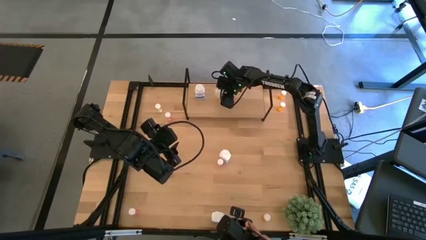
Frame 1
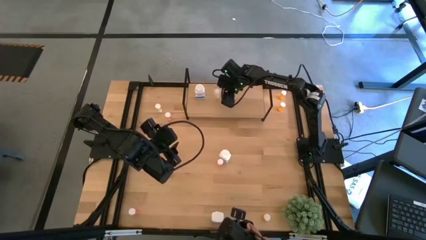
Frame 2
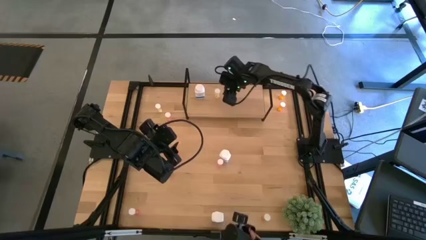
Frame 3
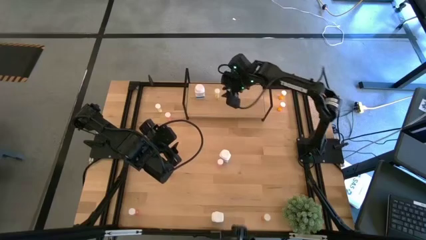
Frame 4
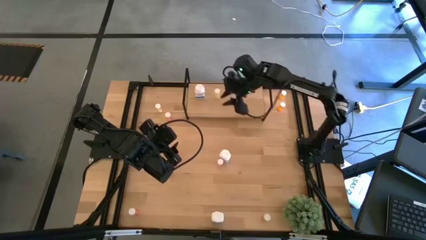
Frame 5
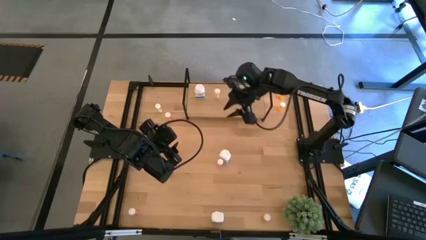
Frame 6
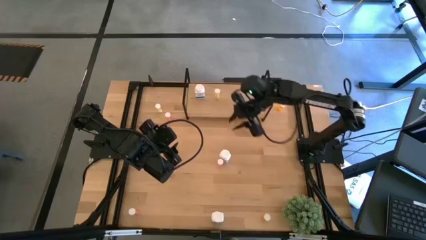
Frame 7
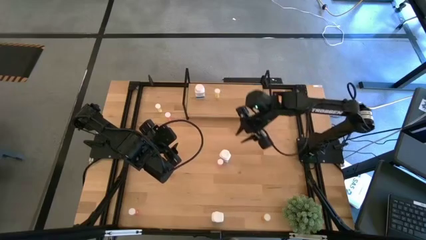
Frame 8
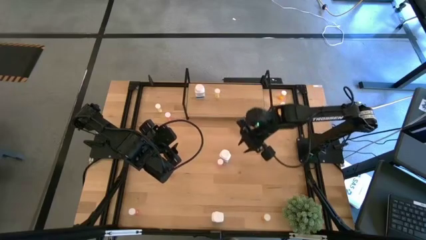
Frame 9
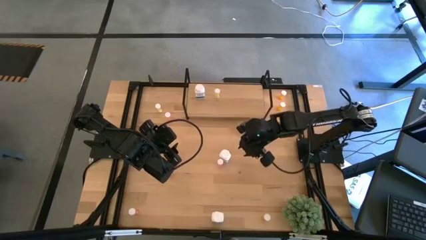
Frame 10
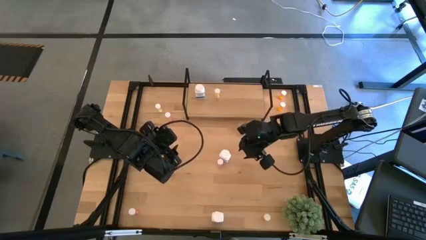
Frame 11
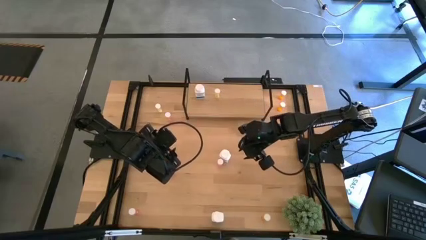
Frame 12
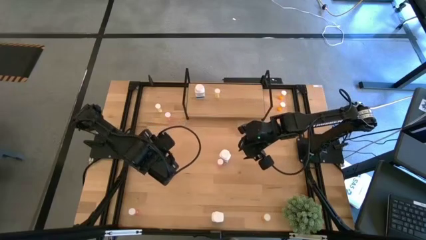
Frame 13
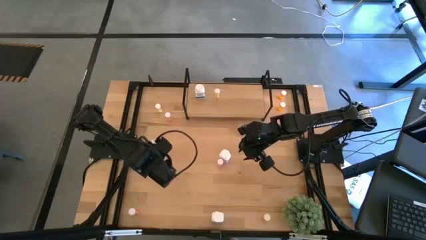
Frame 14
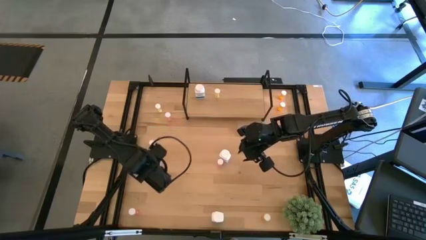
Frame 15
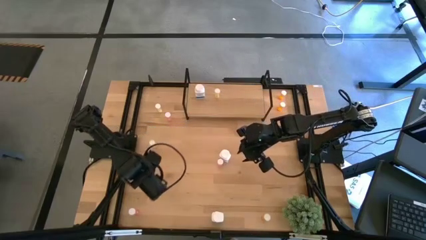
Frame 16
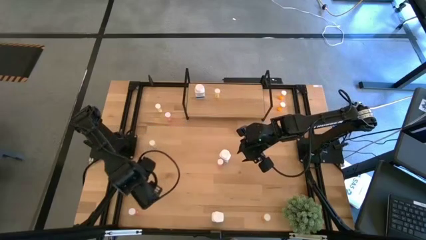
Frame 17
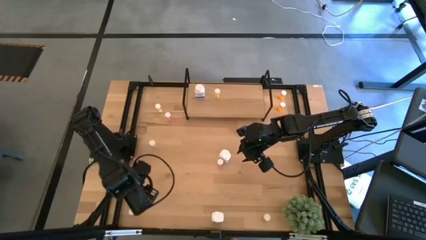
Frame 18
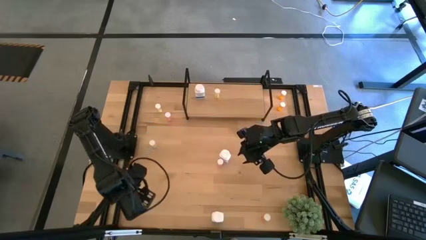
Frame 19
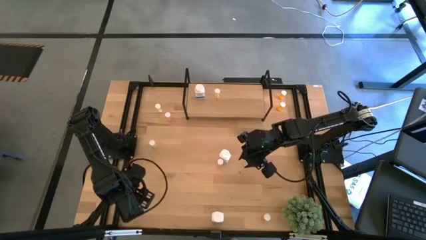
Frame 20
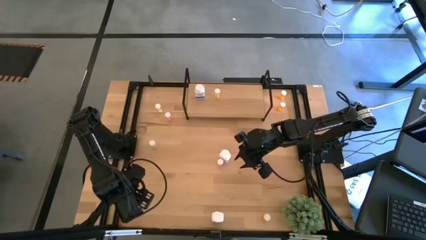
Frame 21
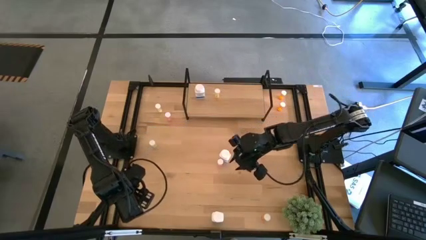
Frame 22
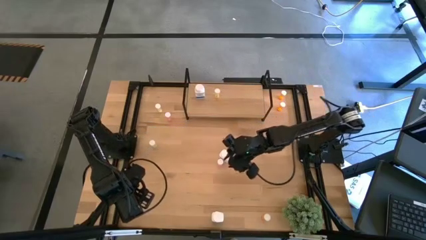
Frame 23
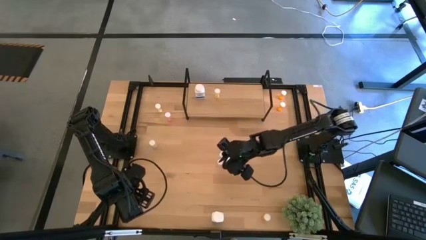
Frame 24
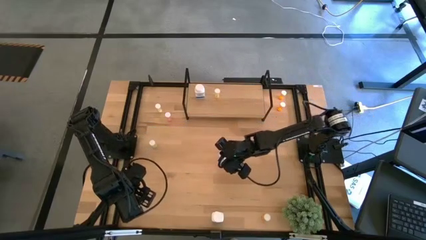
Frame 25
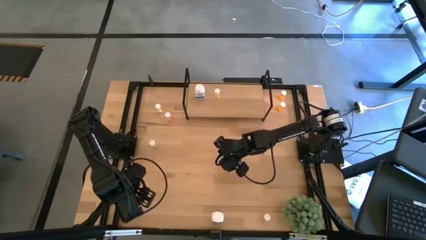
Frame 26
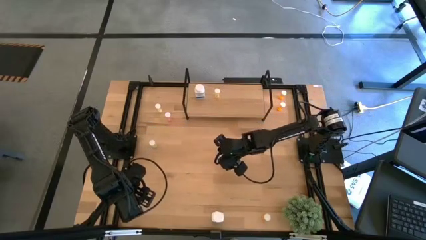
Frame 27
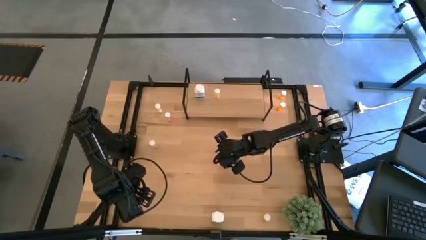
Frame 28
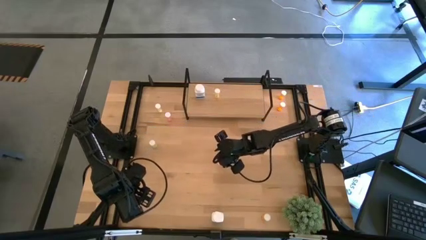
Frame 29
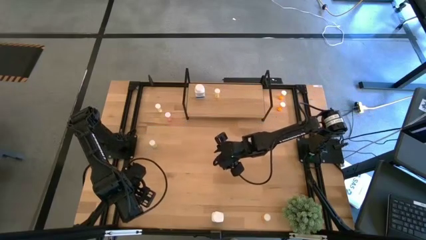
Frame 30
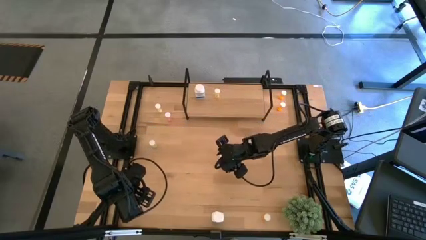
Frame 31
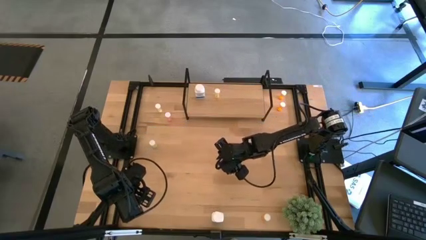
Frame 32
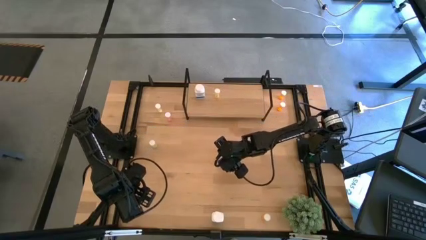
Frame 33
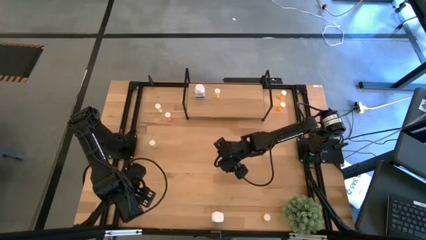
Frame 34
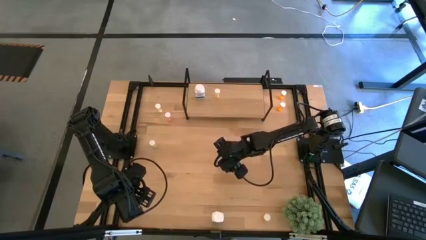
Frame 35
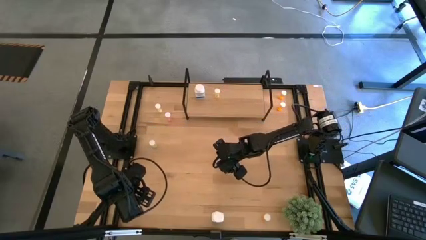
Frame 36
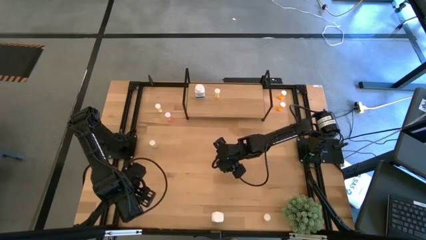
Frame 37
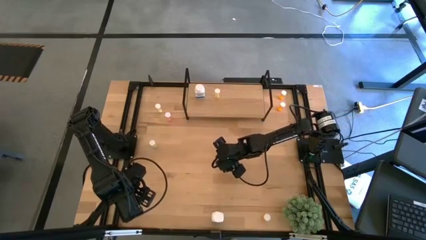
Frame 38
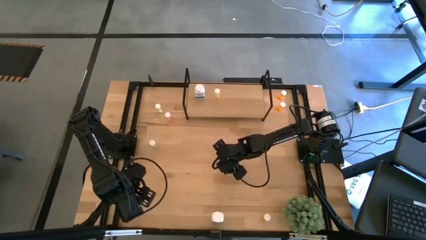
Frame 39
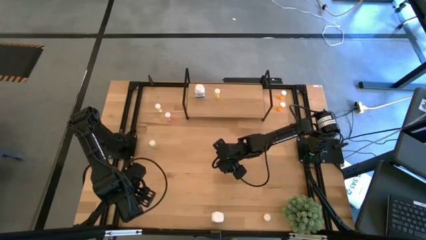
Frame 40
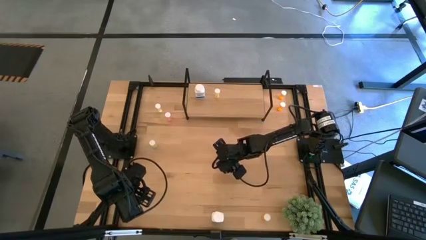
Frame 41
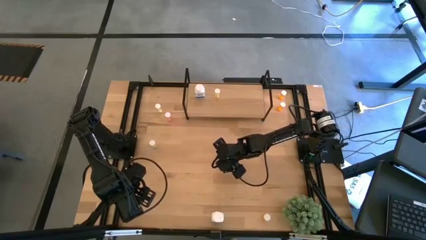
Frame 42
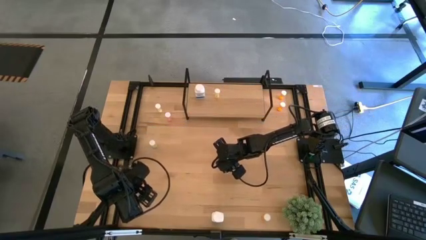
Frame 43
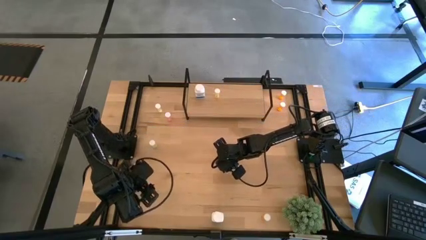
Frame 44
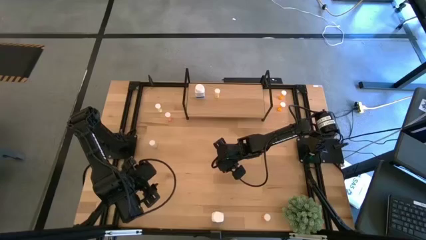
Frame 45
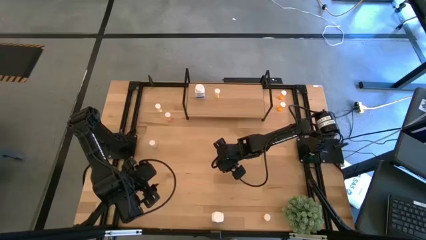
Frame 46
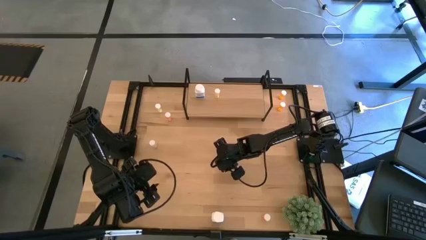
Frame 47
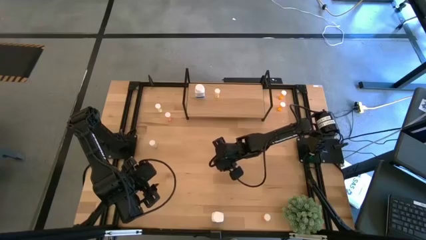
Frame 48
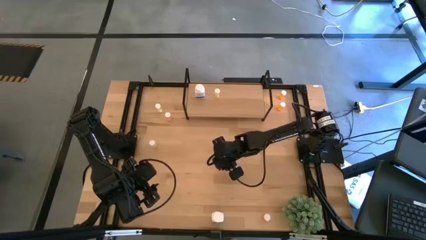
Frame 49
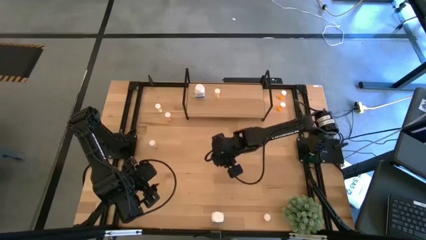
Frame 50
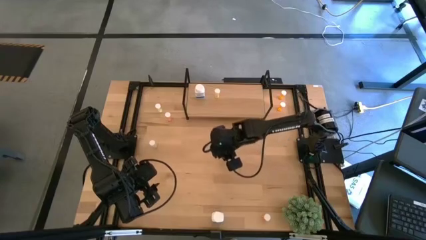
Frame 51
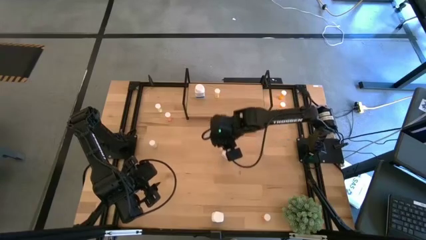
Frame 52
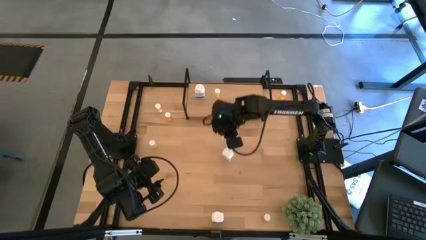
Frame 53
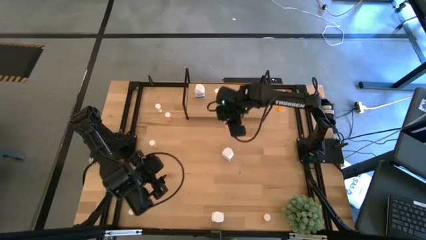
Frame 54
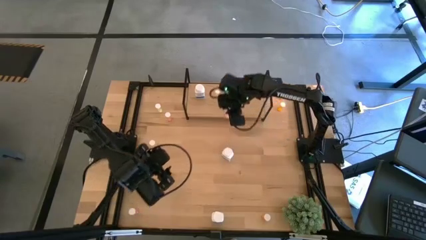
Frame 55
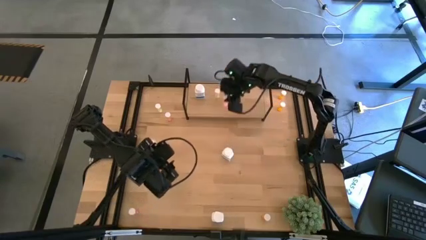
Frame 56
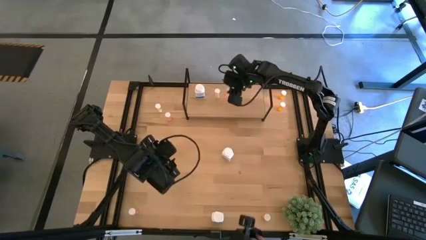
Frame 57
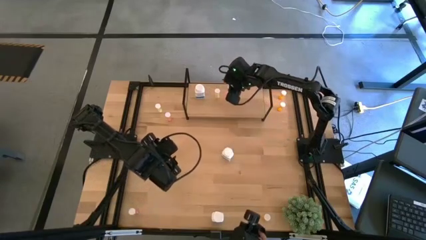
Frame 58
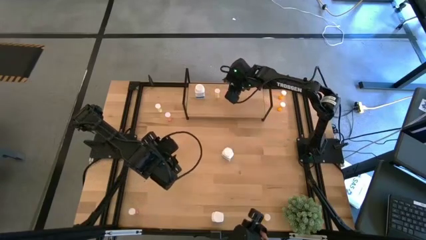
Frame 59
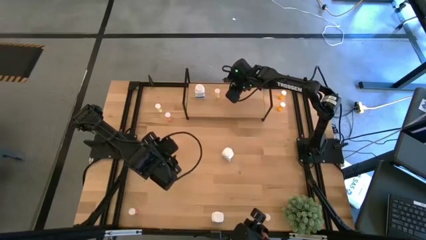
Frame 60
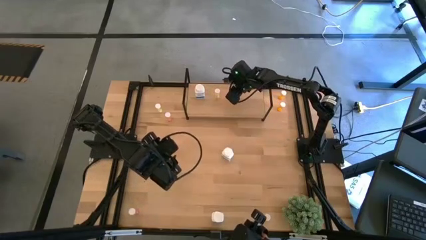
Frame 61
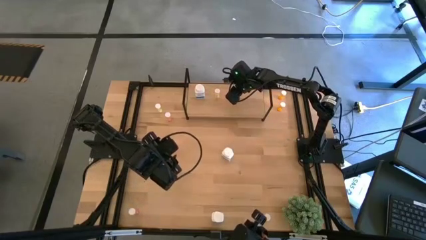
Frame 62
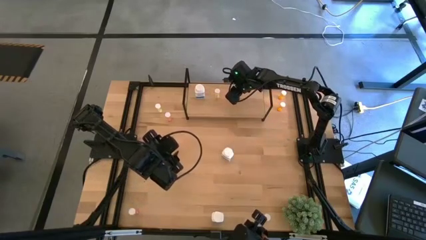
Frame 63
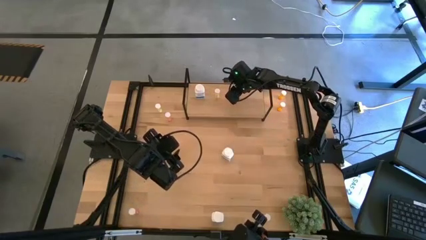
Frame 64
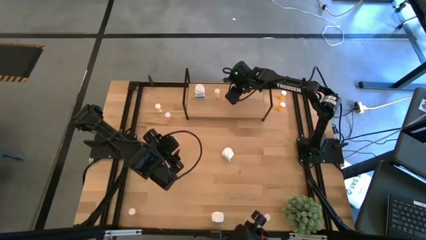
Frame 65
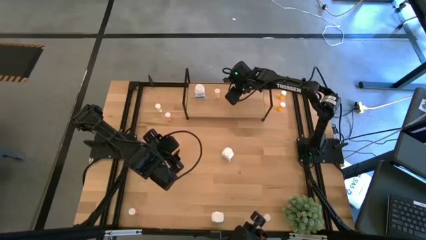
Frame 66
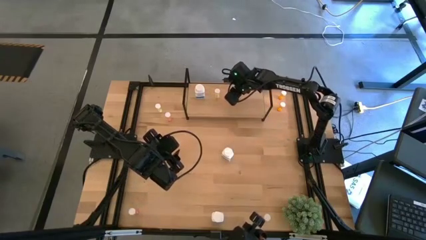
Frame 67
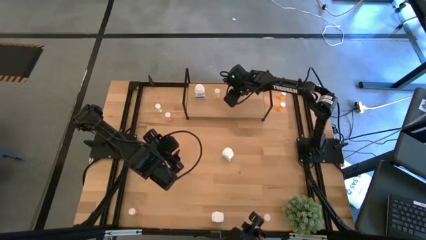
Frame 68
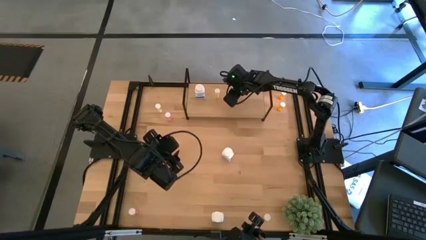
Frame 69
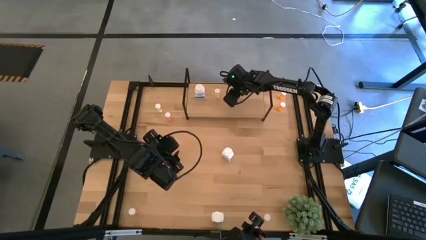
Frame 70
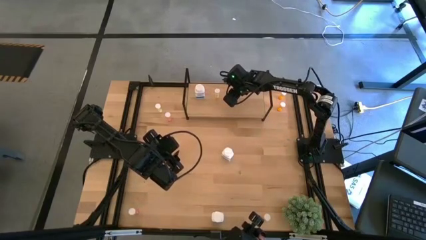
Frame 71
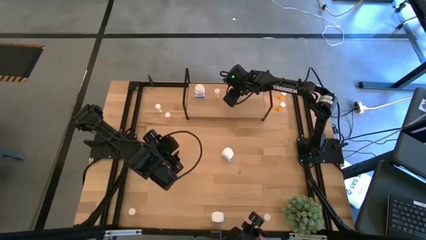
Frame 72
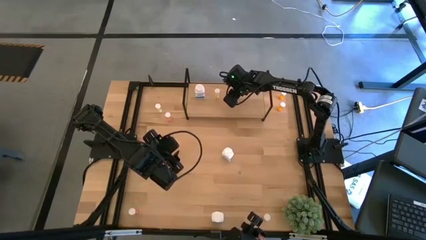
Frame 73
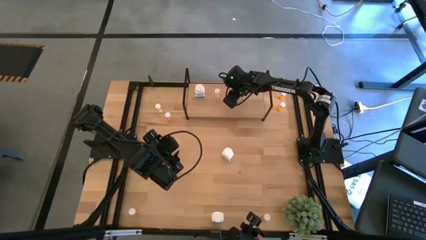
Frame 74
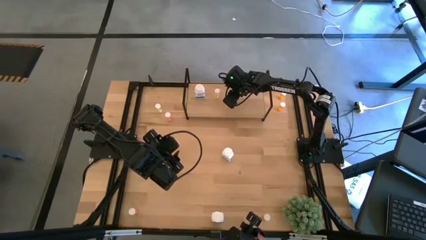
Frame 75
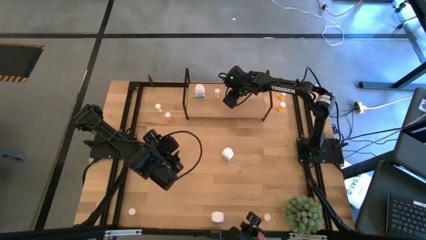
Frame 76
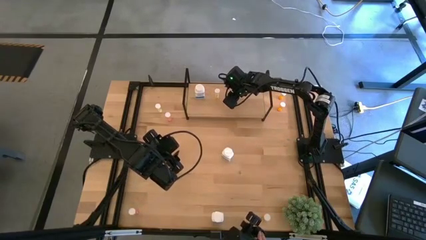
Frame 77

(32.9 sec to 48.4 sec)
Task: Pick and place medicine bottles onto shelf by color
Put the middle red pill bottle on the shelf
